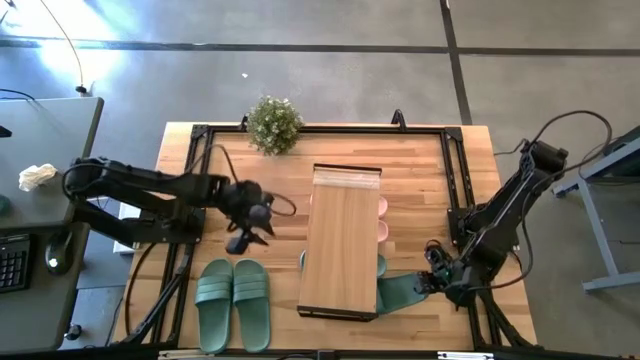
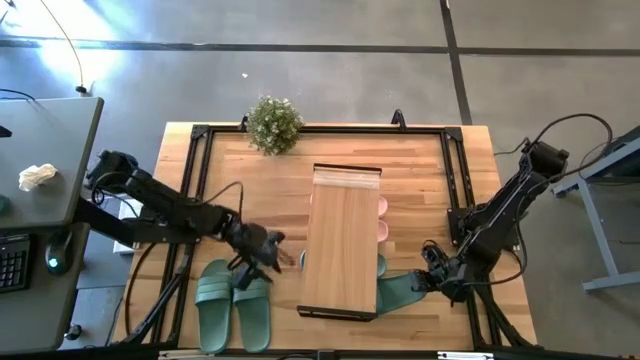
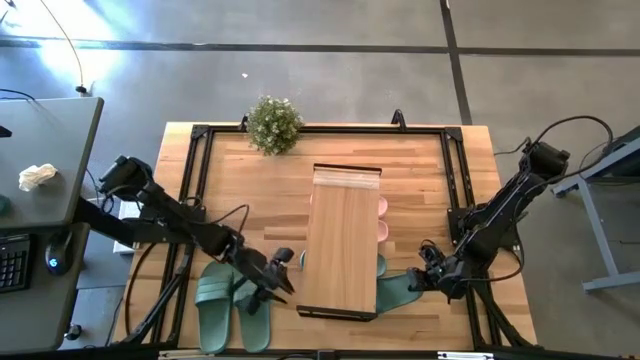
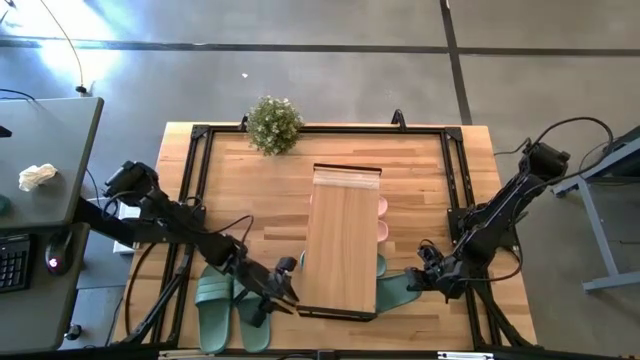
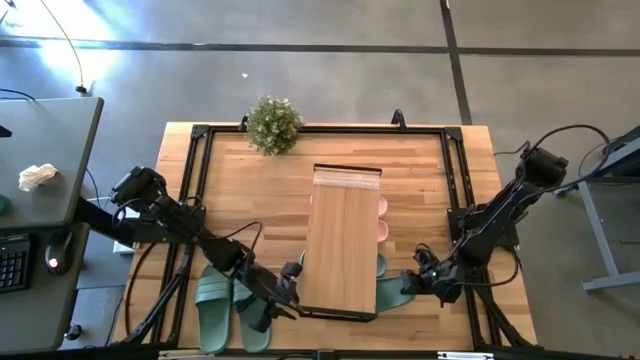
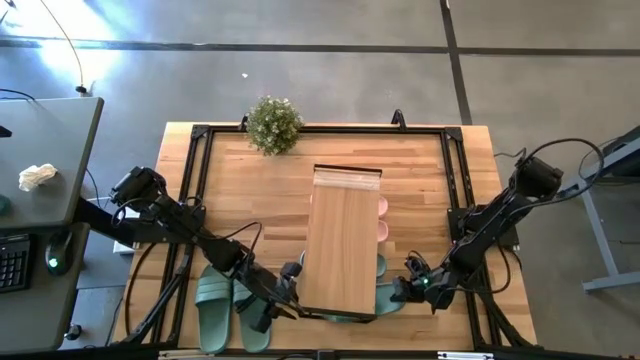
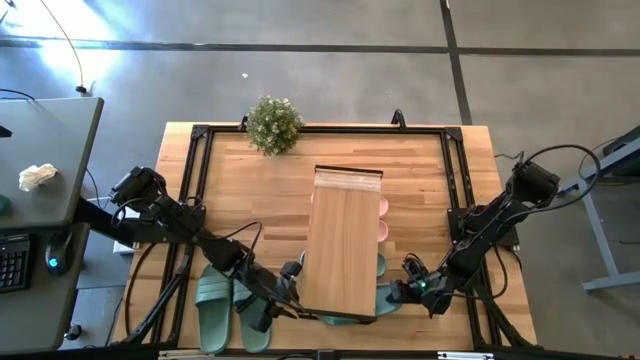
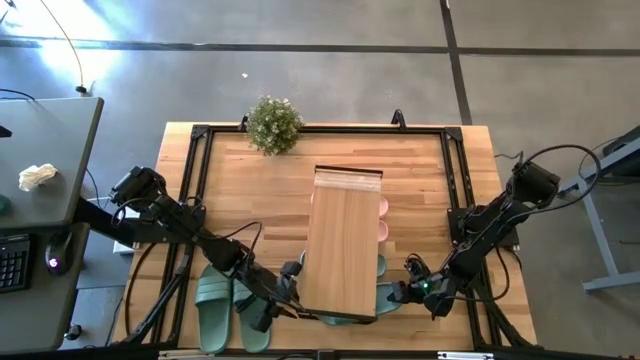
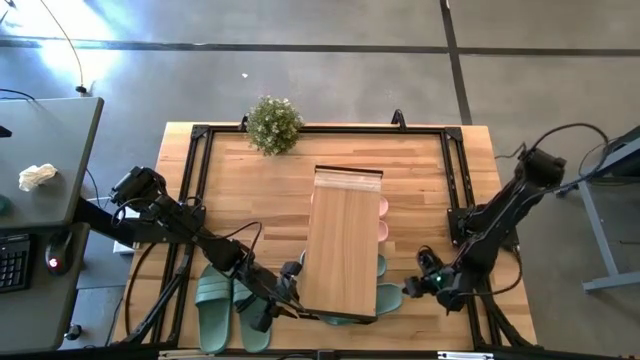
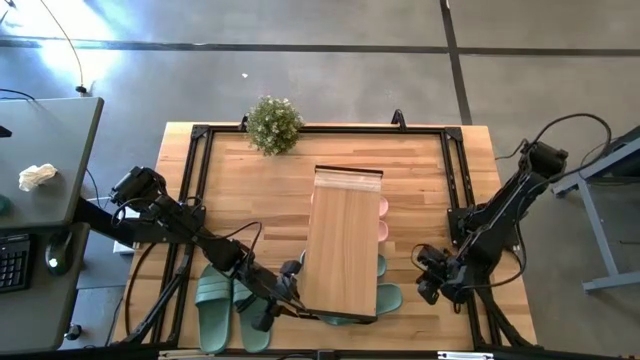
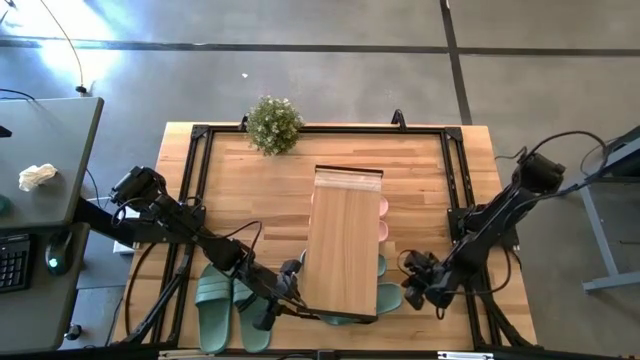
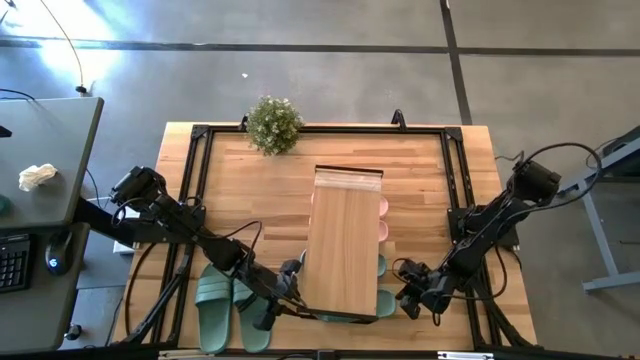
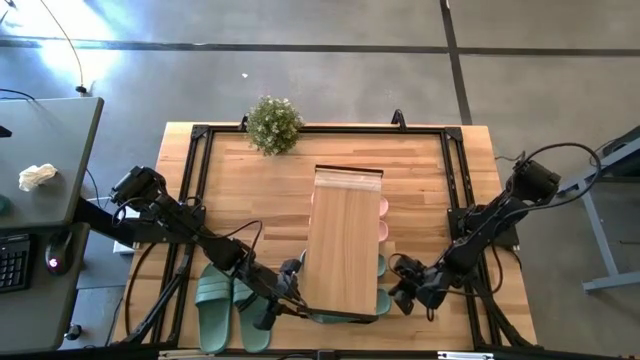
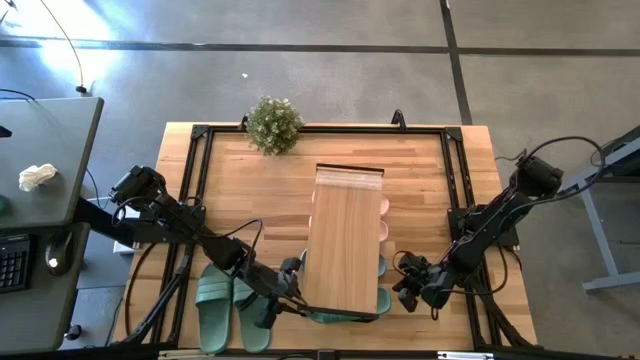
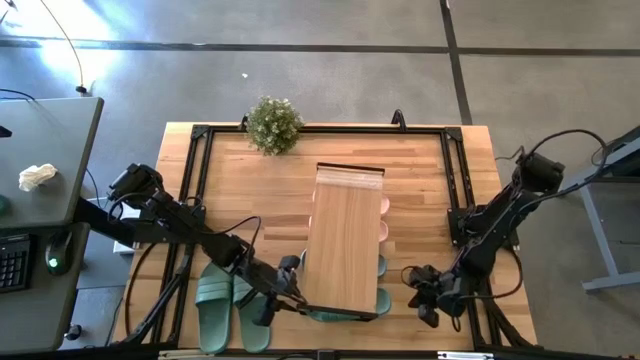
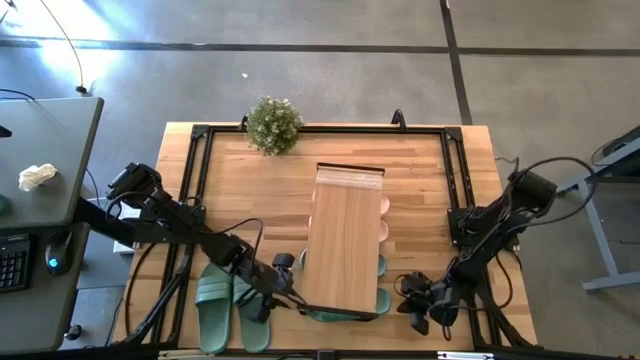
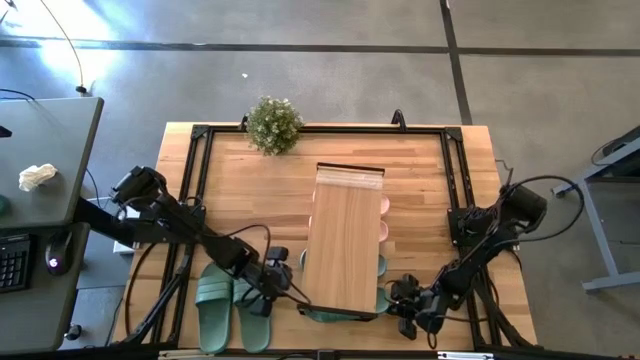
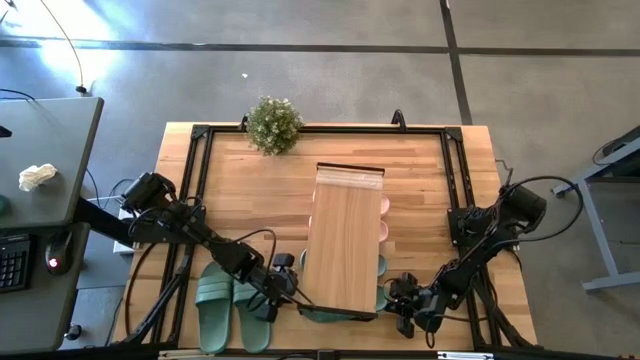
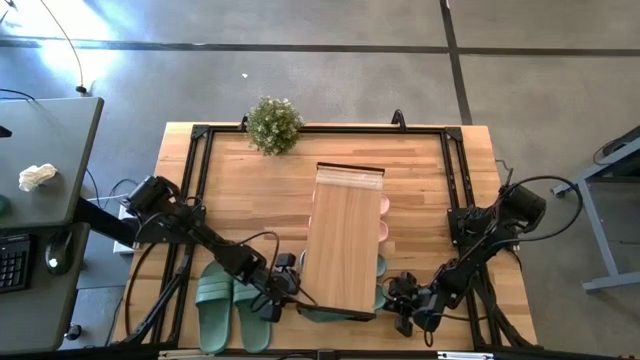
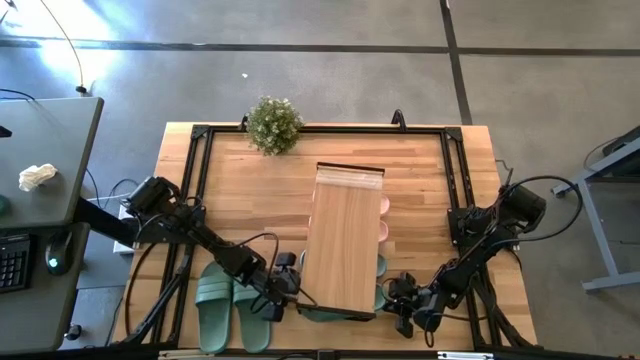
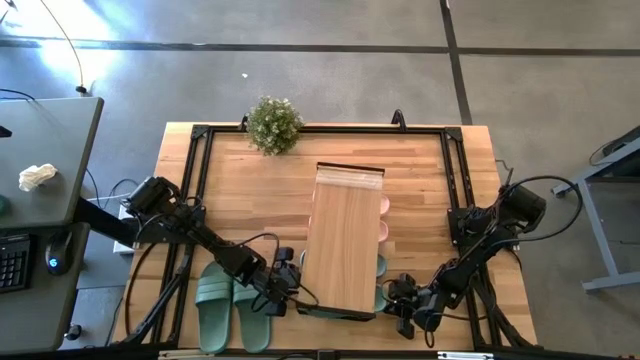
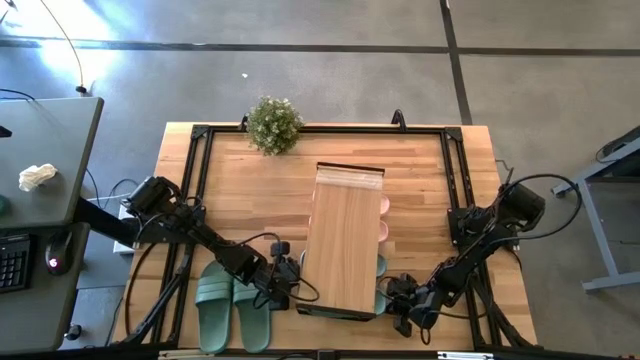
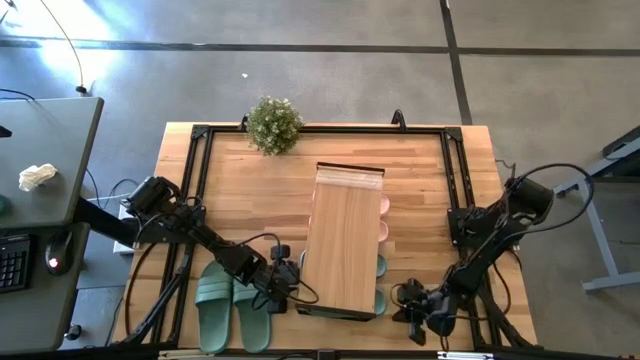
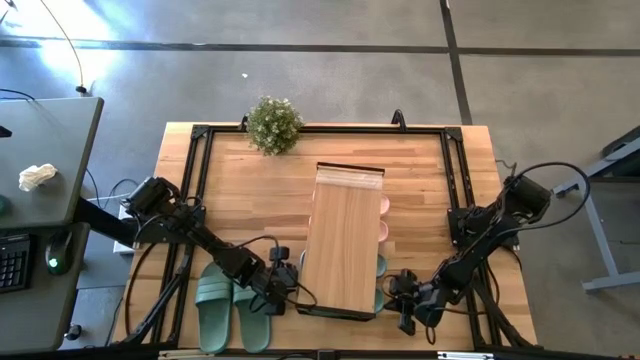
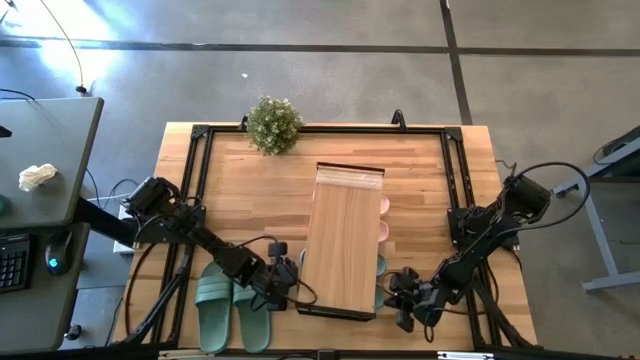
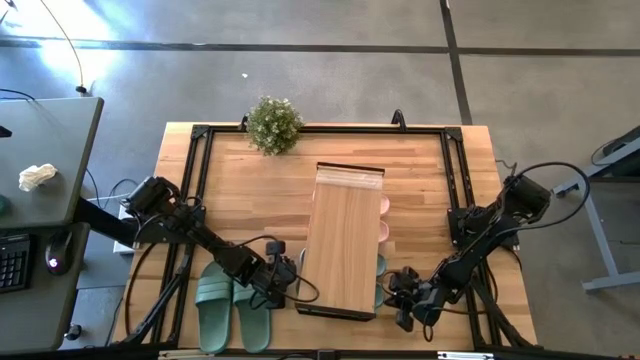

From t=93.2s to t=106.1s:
Task: Pick and place slides into the shelf
Put the top green slipper under the shelf

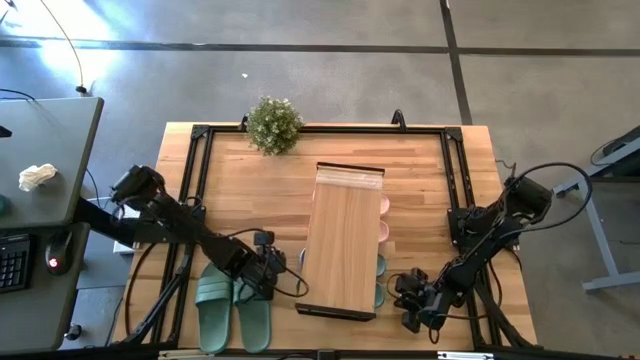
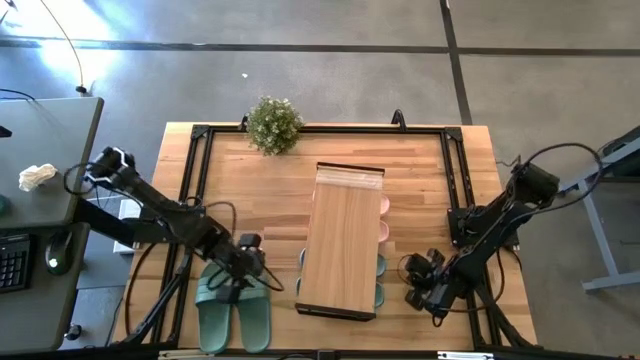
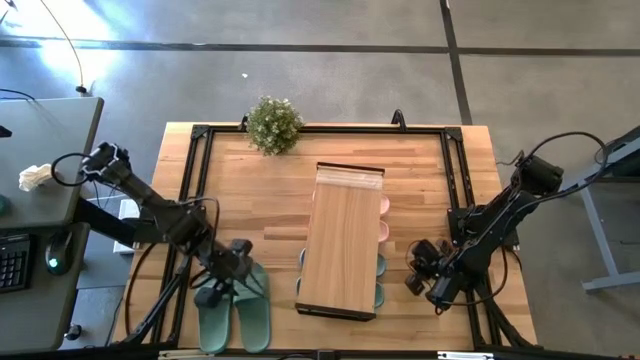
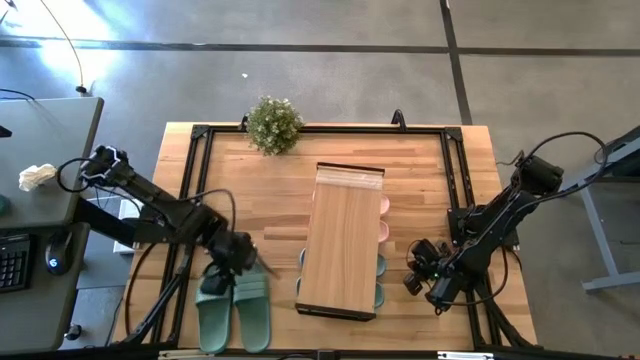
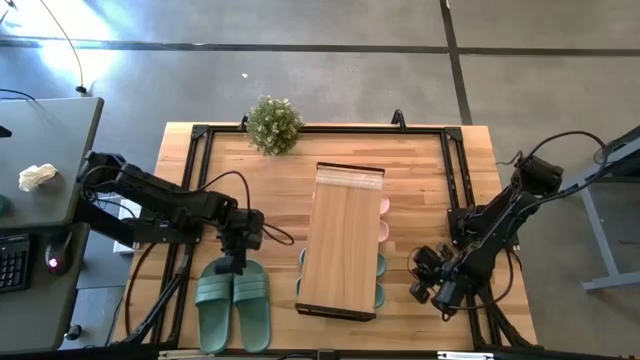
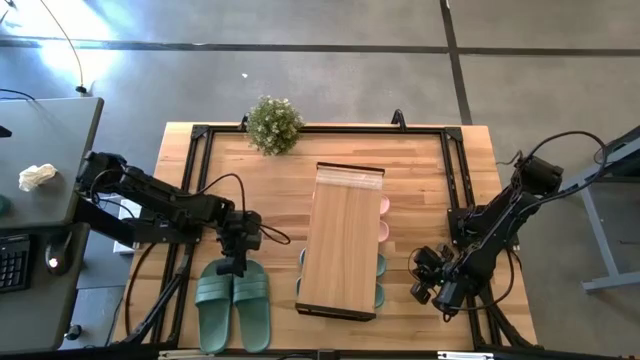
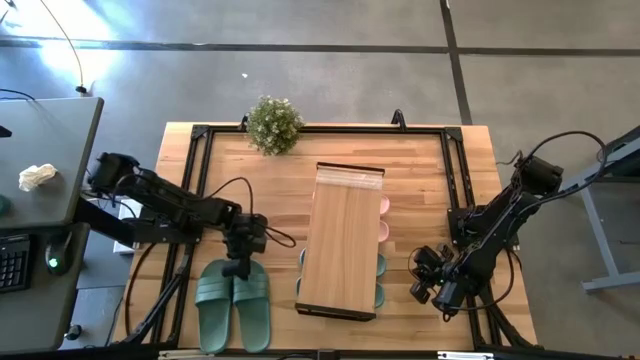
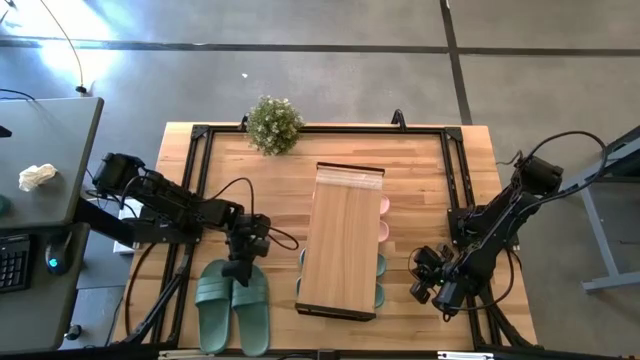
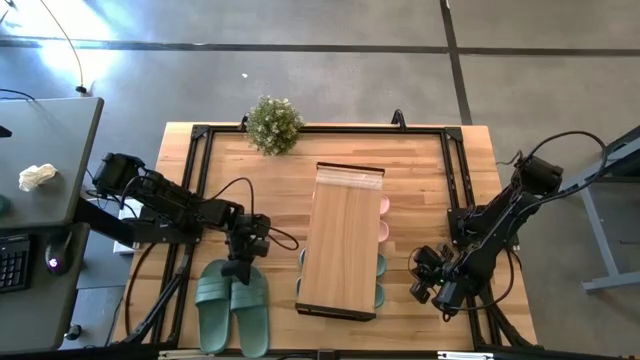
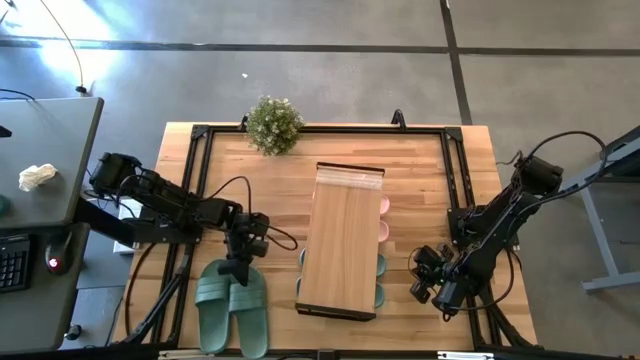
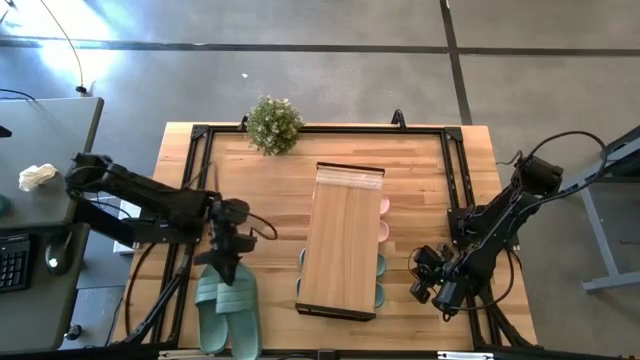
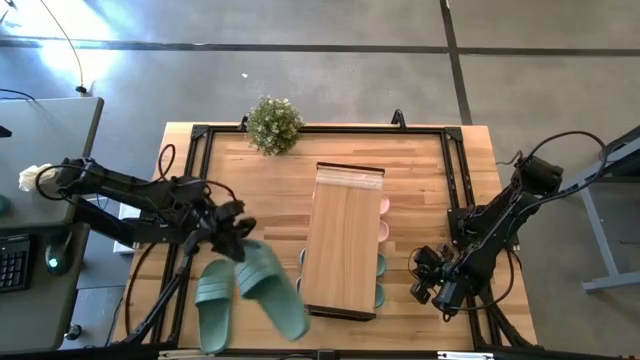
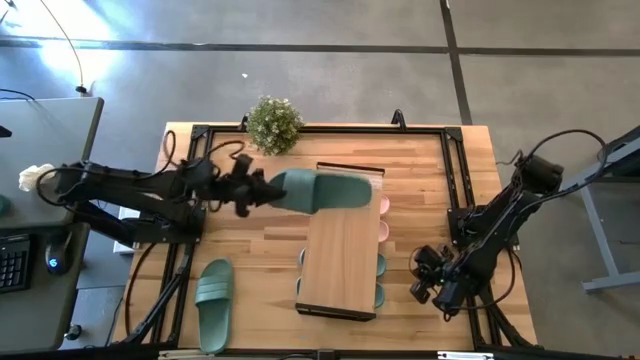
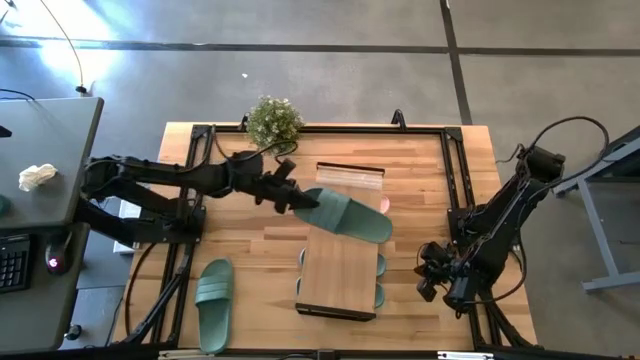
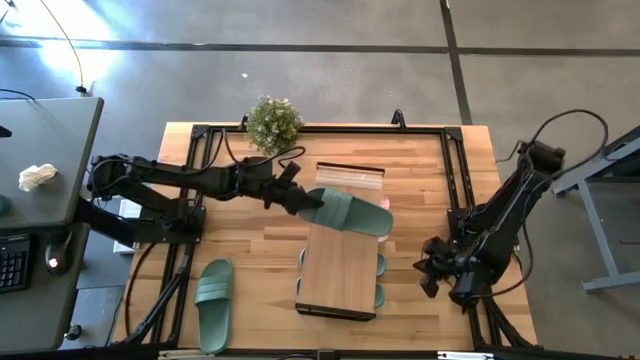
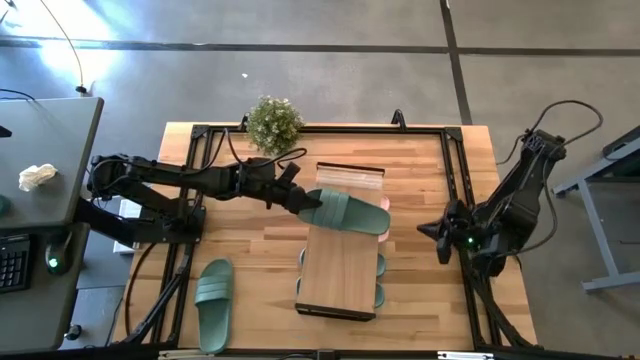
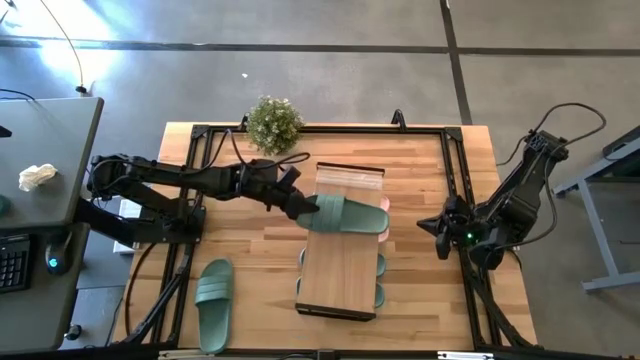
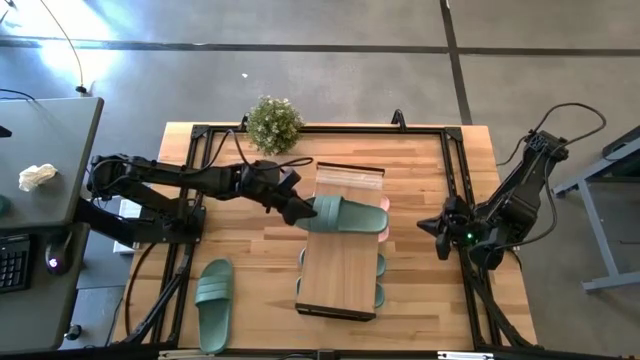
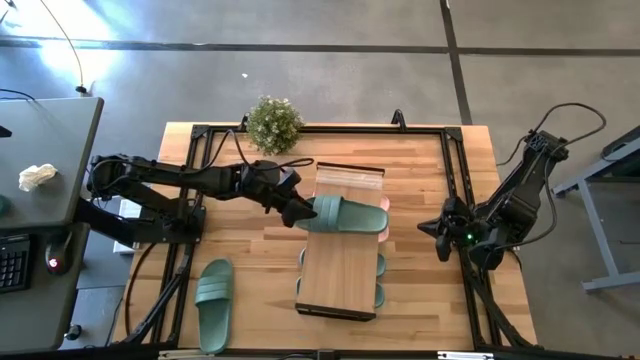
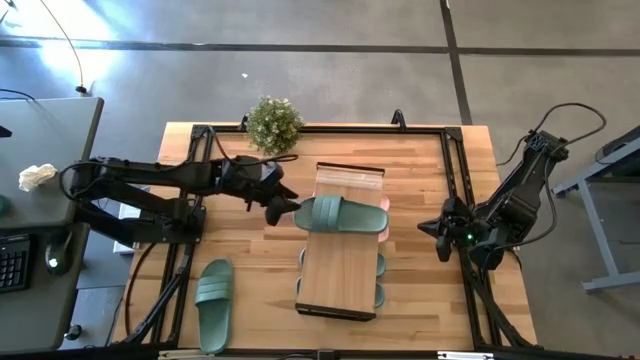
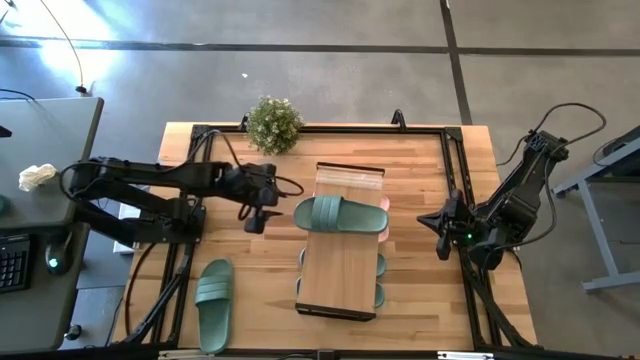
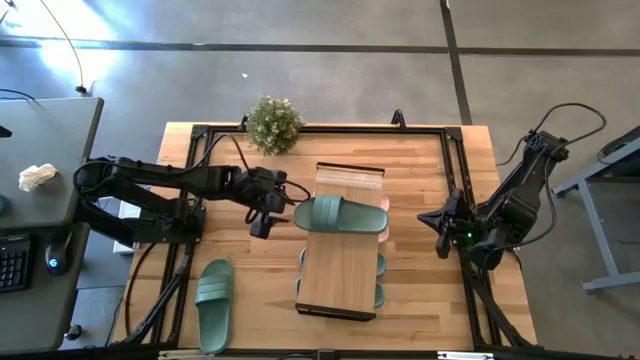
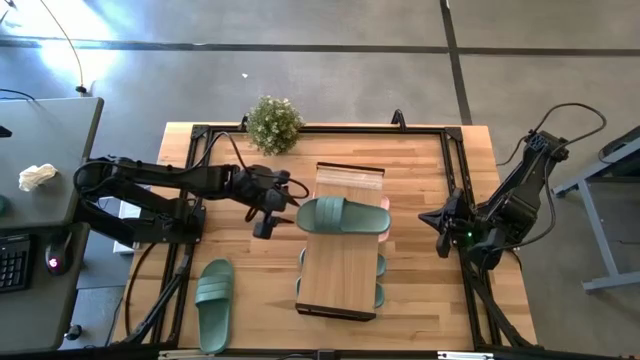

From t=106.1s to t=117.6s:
Put the right green slipper on the shelf
